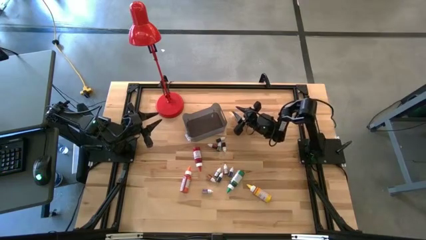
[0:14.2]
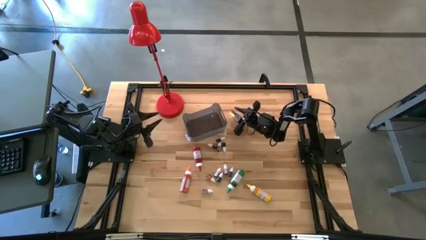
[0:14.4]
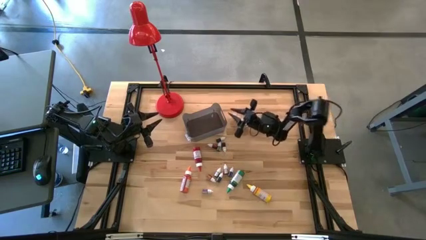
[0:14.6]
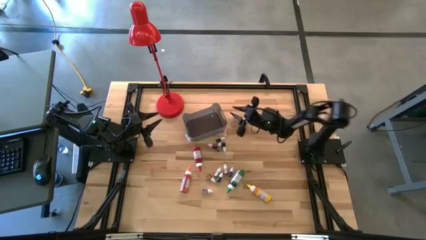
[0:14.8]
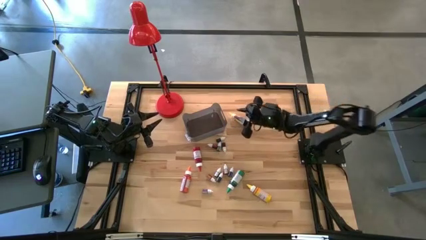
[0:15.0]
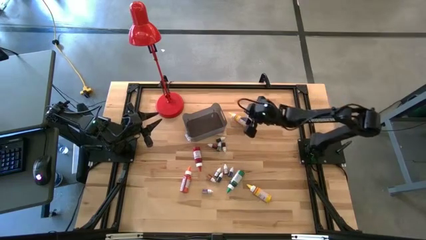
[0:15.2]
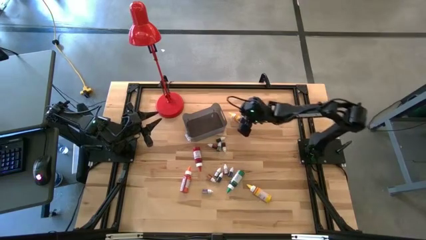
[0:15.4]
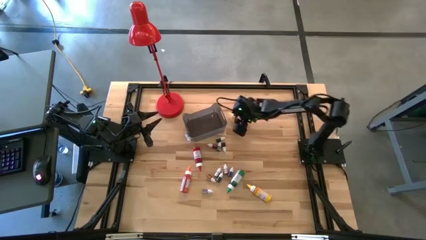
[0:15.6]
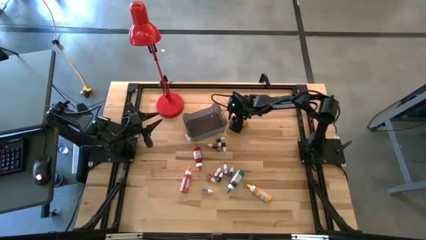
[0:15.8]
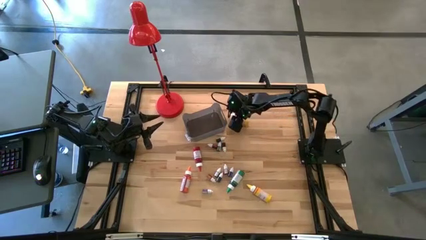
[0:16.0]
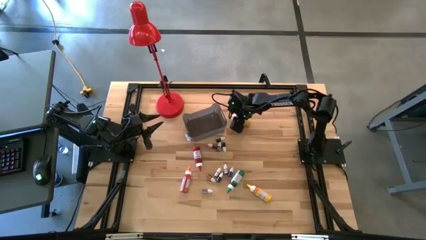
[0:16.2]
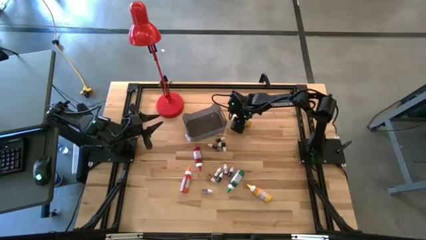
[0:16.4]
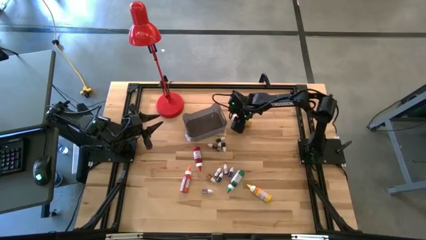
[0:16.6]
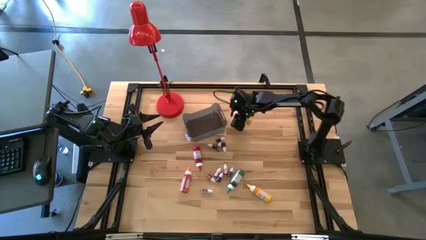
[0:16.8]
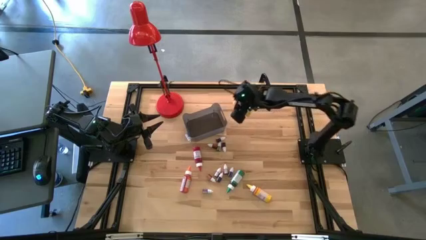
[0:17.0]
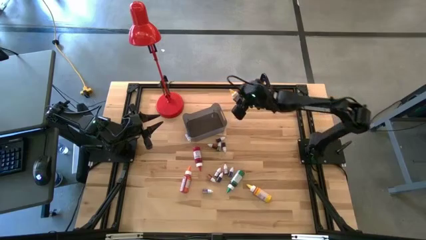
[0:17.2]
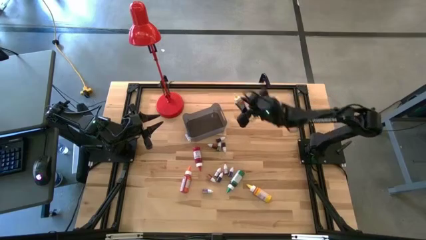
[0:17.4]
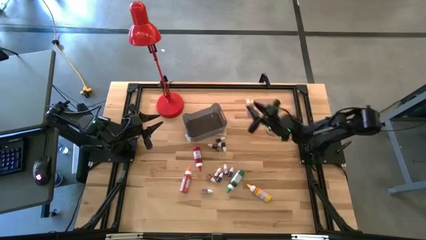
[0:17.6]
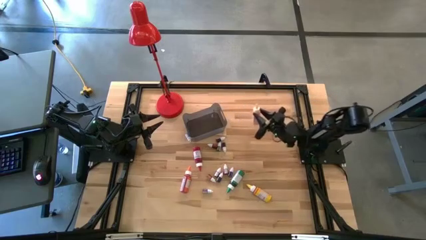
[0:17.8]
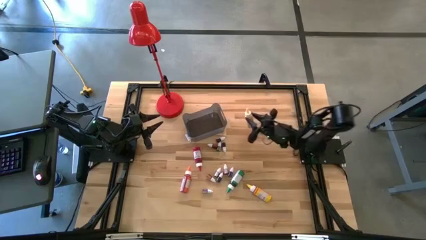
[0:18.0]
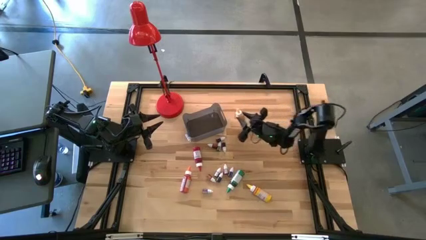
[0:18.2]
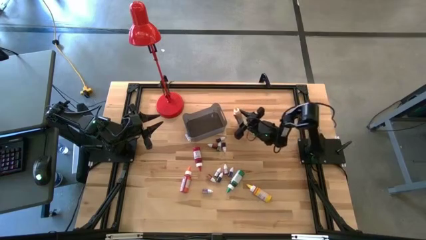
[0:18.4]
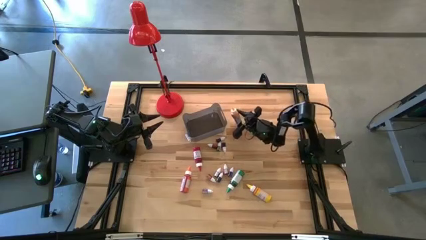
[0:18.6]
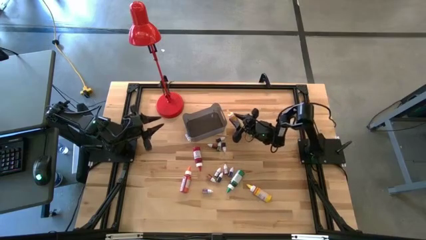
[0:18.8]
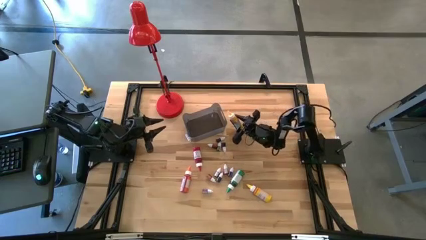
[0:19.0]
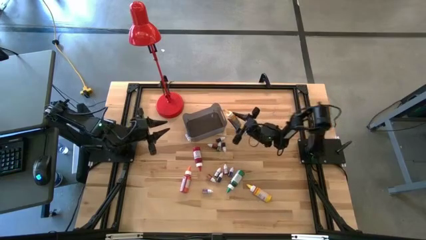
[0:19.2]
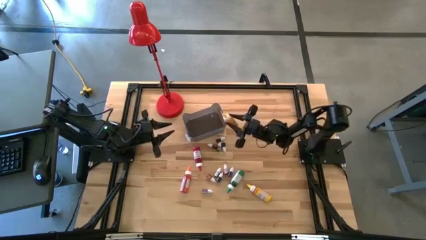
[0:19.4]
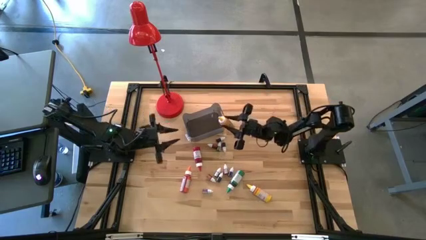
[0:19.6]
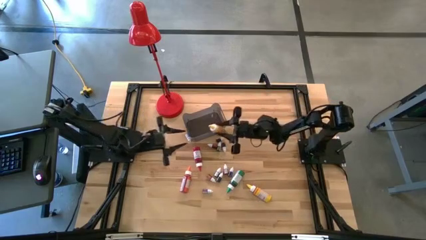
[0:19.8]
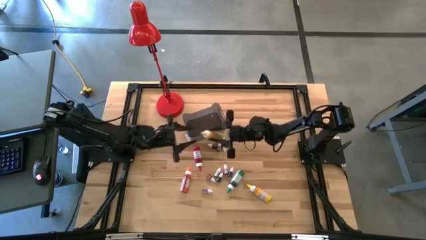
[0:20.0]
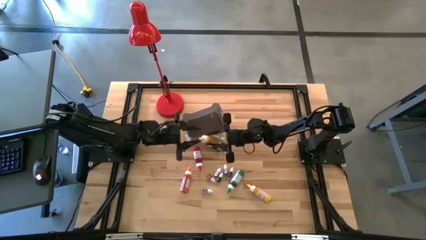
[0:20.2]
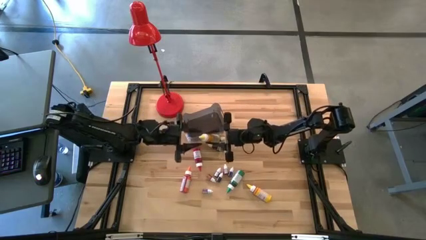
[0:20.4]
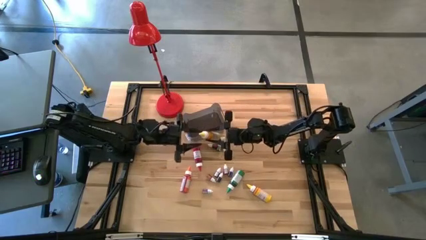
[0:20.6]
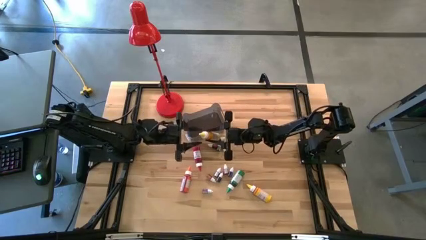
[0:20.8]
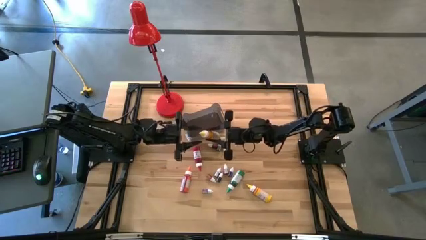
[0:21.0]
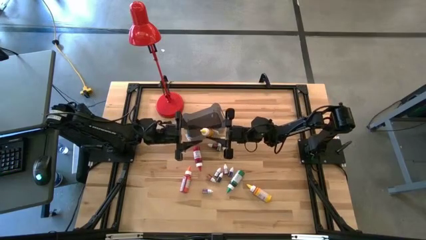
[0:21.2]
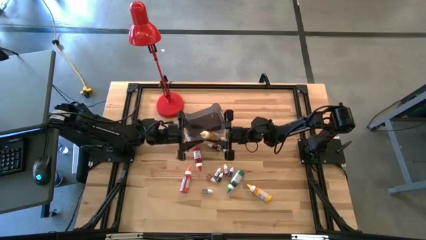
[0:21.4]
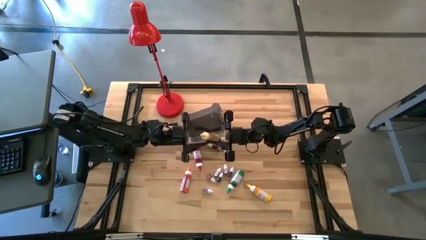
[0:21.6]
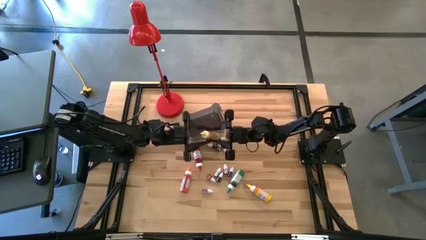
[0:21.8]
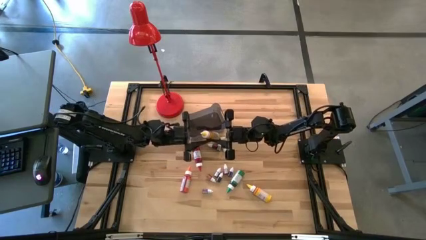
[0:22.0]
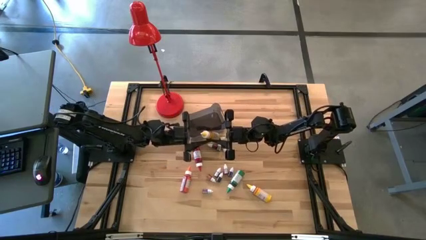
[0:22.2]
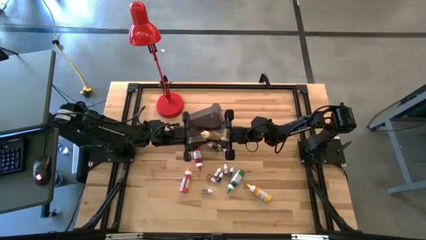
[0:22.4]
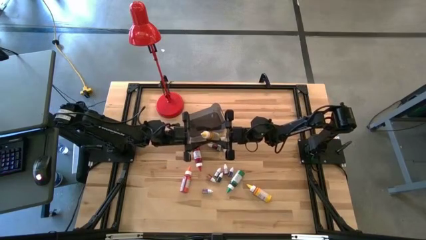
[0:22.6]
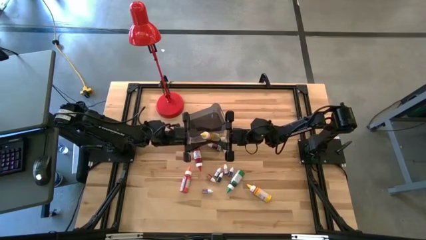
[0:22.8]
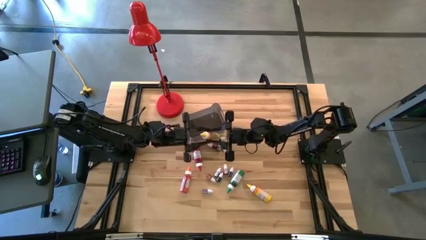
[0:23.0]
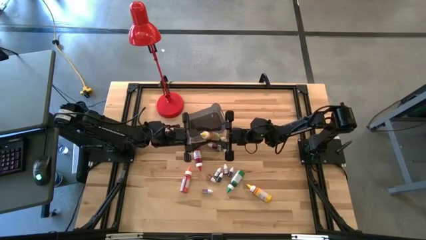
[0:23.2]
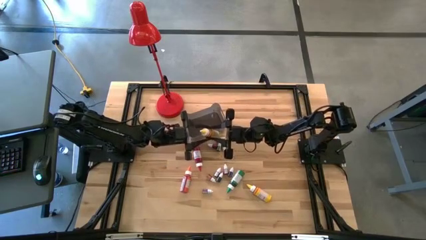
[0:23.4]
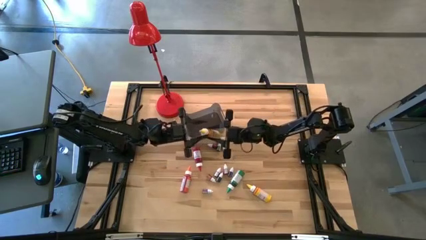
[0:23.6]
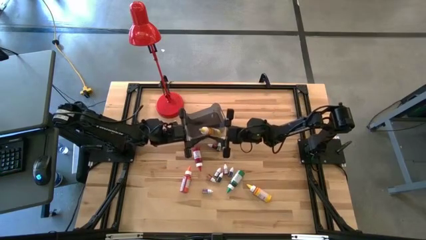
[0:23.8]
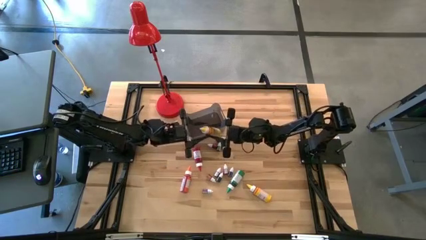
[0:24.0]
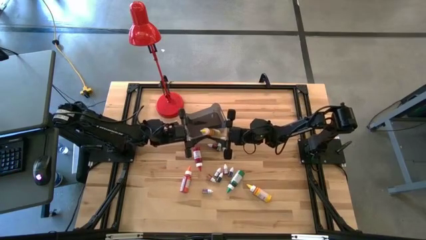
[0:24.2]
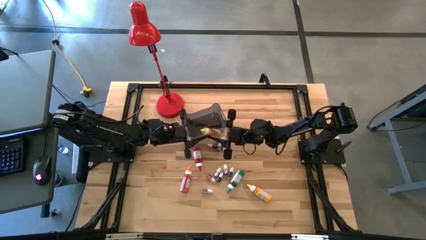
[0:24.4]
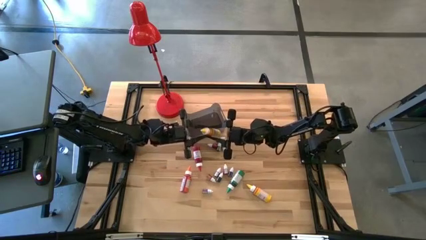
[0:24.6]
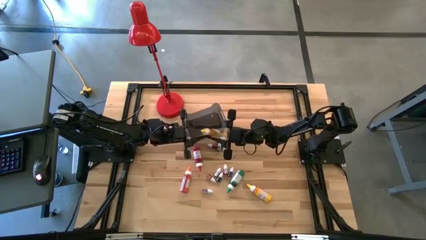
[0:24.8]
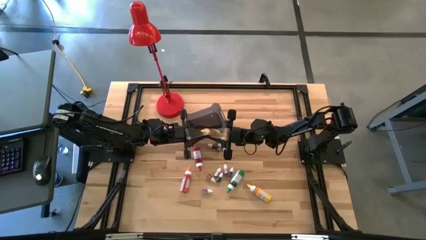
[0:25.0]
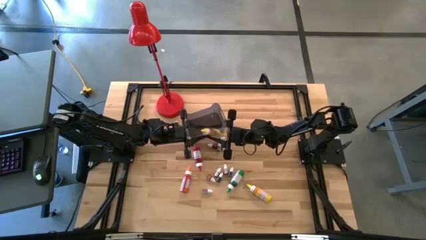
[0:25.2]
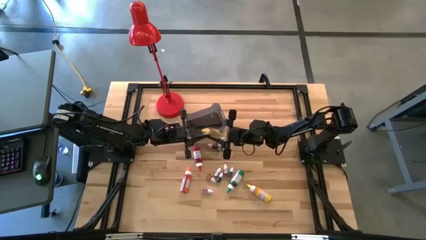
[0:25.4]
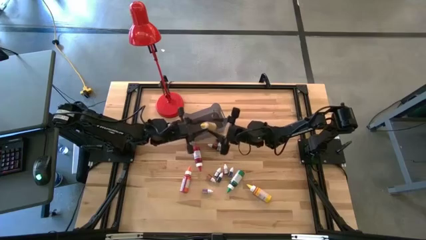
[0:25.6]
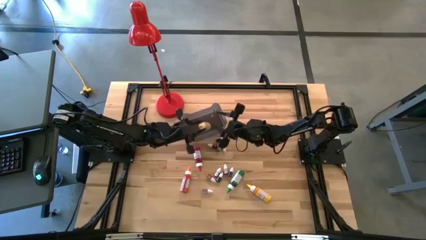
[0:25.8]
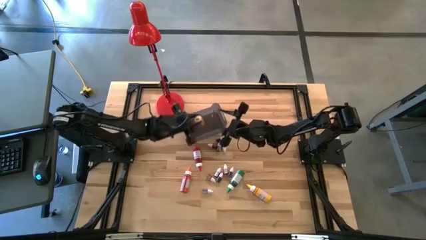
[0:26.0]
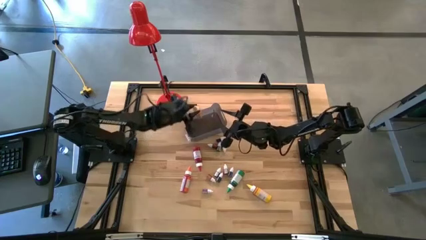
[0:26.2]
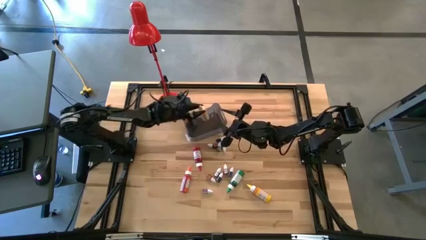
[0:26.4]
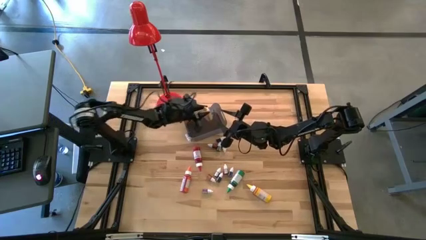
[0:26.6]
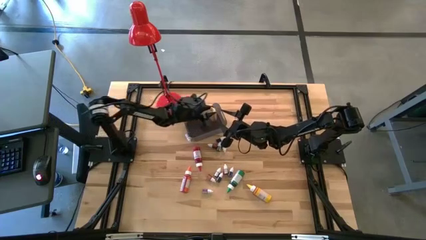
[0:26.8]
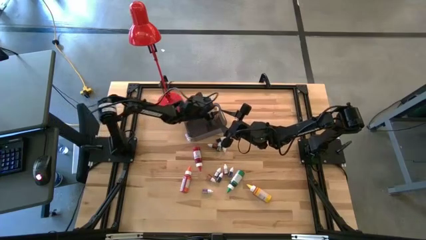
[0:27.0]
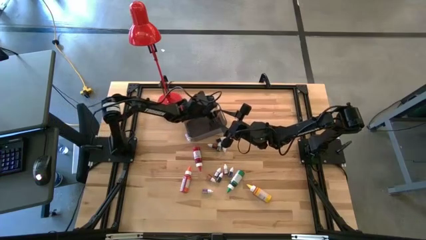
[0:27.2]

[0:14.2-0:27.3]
Task: Pick & Place food coloring
Put the top large yellow food coloring bottle into the bin

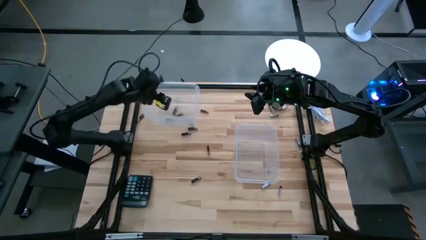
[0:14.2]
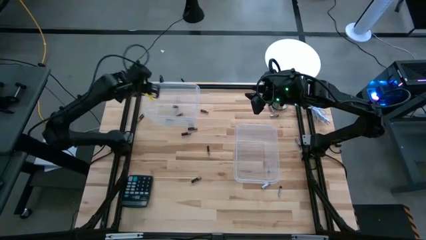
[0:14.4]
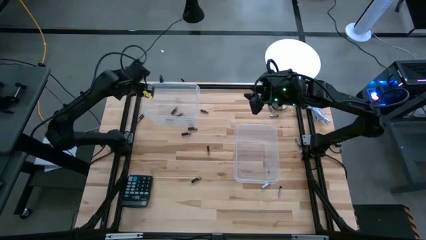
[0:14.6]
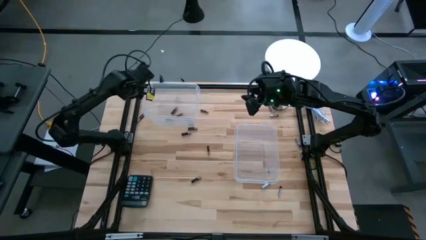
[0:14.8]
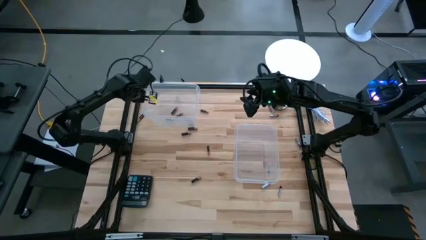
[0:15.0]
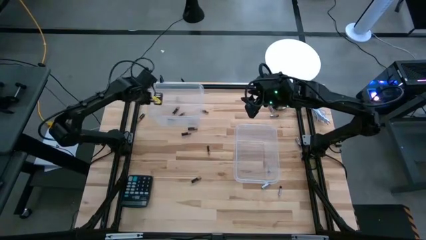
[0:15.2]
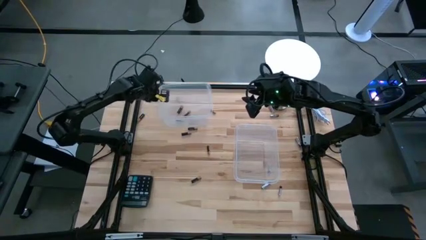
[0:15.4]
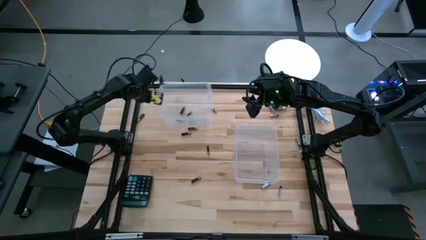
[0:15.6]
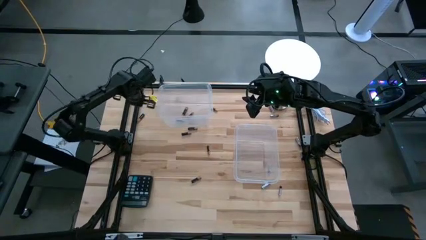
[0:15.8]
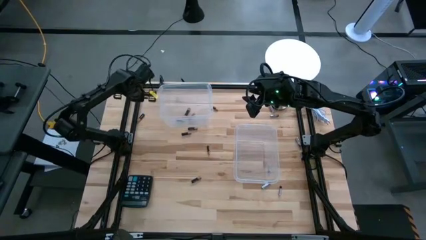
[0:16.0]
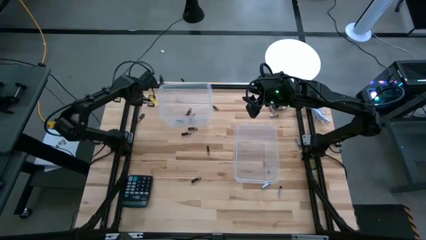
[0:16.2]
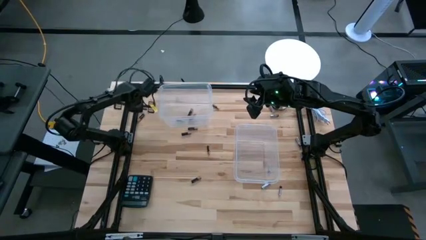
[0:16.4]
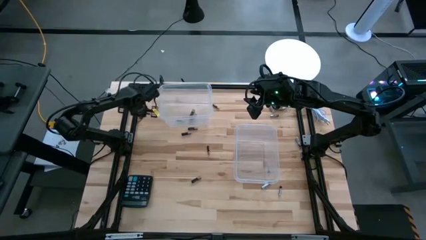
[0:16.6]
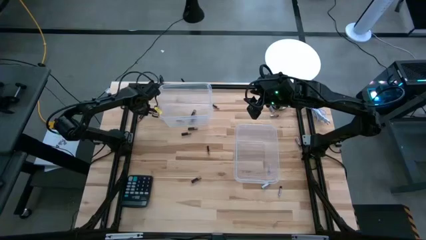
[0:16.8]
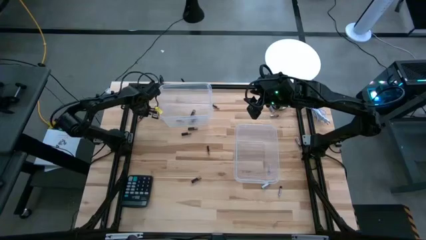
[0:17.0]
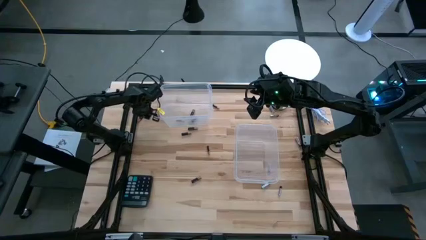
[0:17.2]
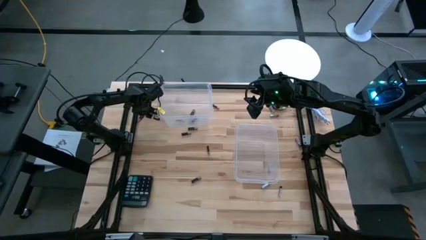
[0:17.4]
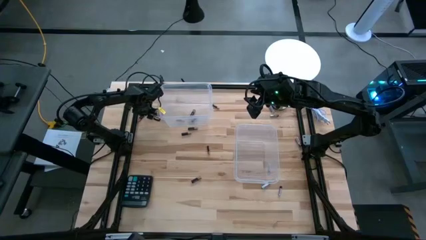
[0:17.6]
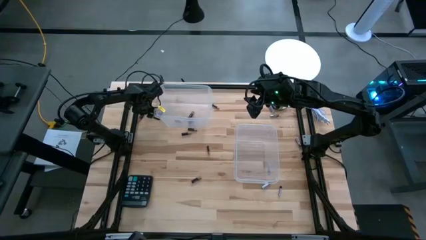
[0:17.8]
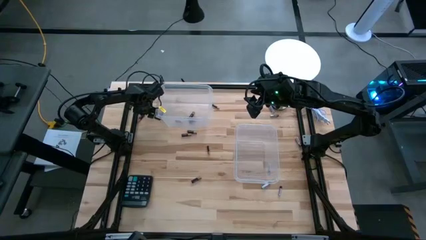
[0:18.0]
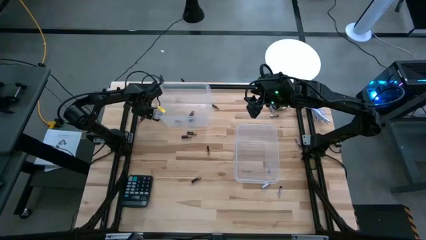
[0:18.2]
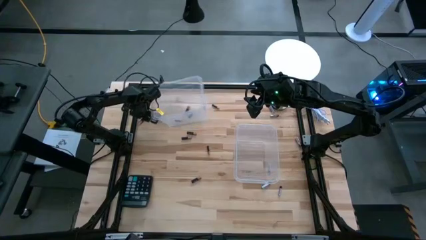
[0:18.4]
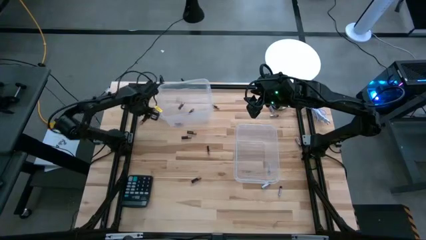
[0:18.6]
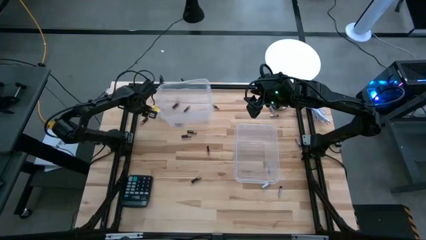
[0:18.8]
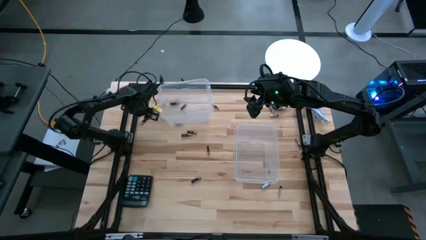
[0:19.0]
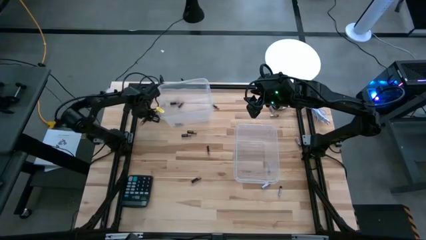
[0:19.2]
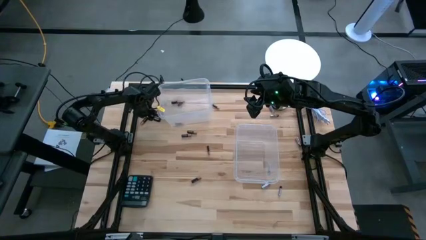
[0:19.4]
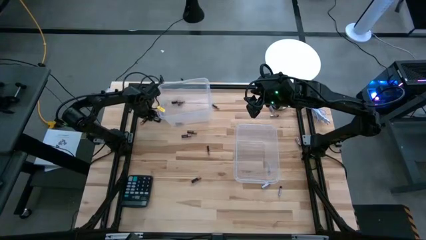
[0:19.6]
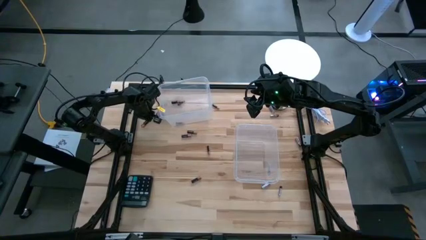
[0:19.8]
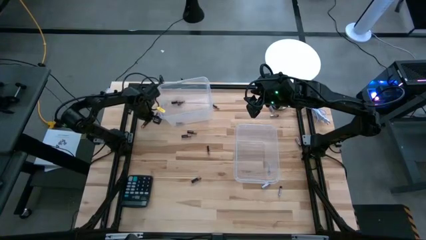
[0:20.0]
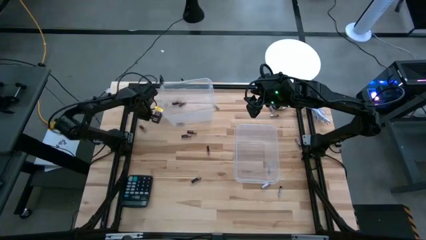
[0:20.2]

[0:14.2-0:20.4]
Task: Sort batteries
Put the black battery into the left transparent bin
